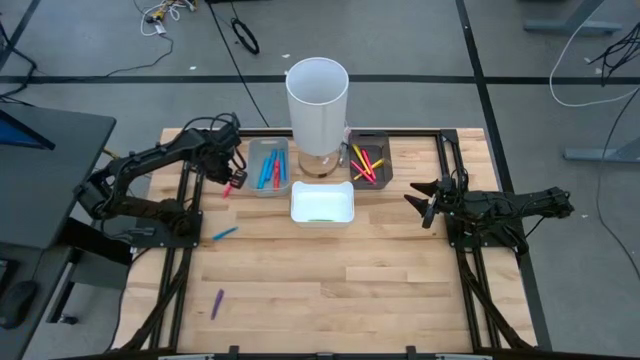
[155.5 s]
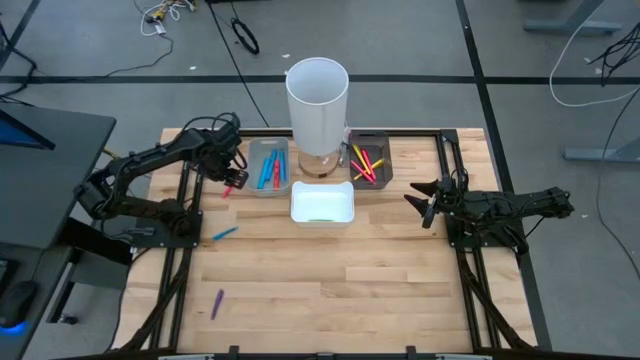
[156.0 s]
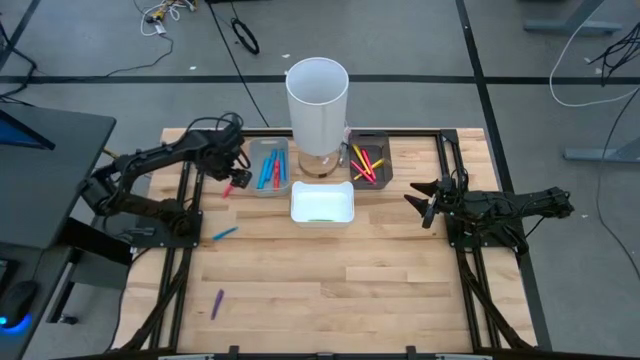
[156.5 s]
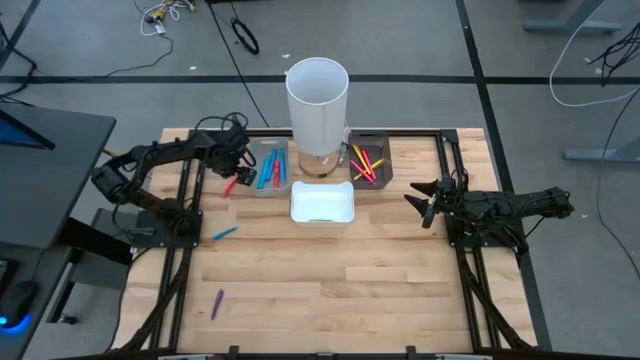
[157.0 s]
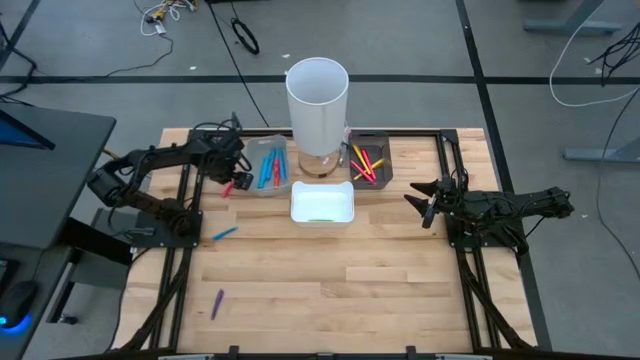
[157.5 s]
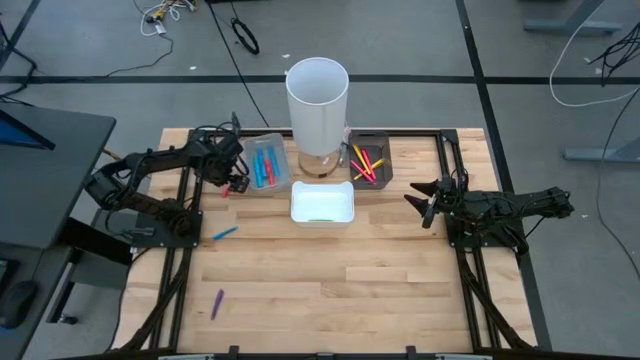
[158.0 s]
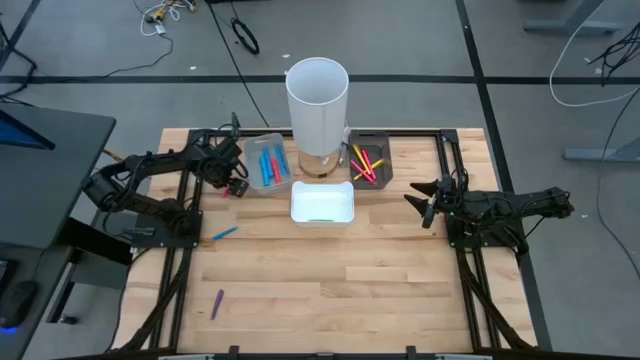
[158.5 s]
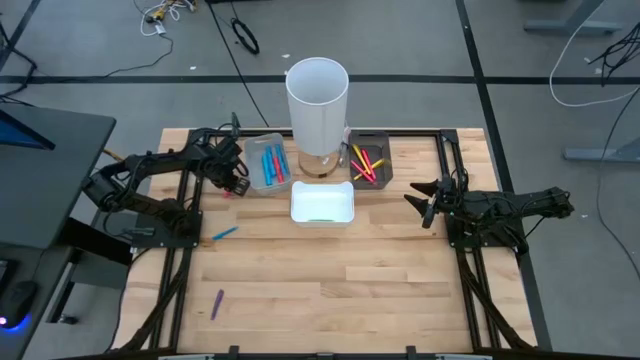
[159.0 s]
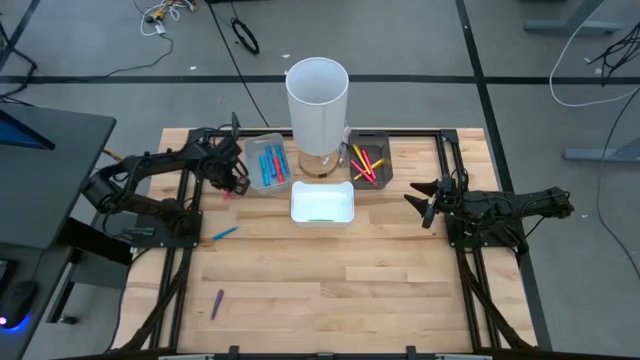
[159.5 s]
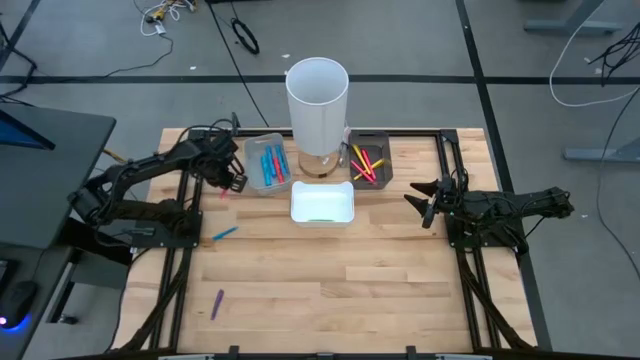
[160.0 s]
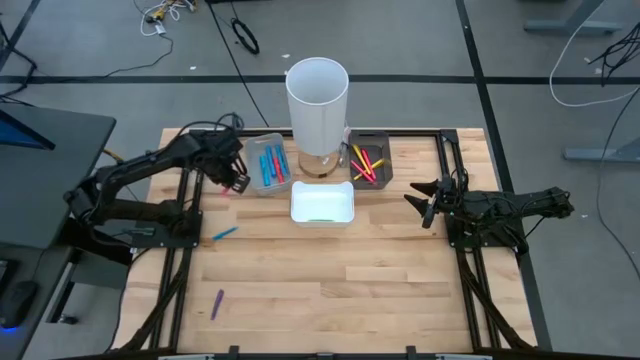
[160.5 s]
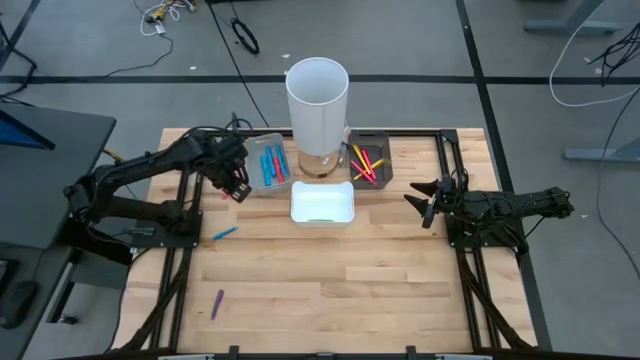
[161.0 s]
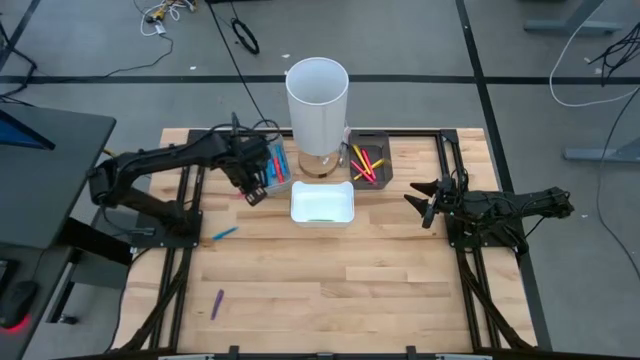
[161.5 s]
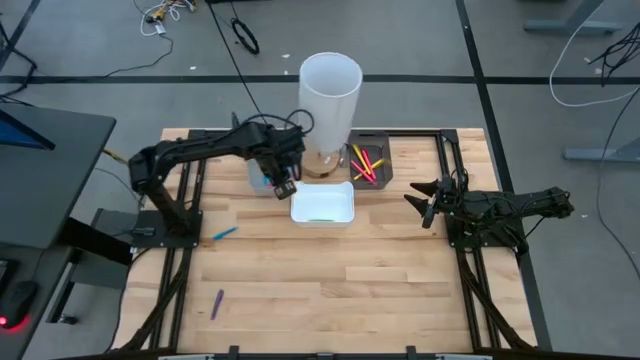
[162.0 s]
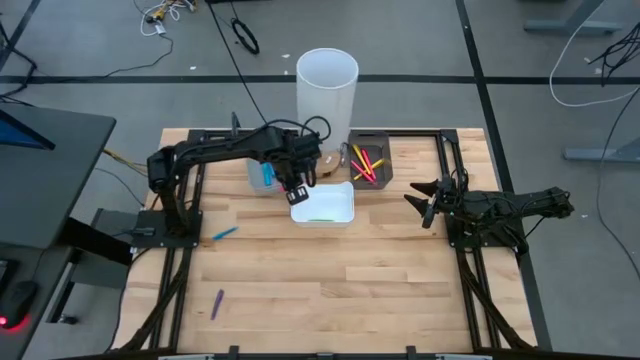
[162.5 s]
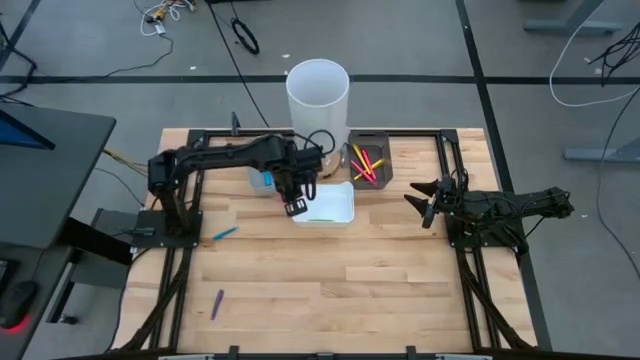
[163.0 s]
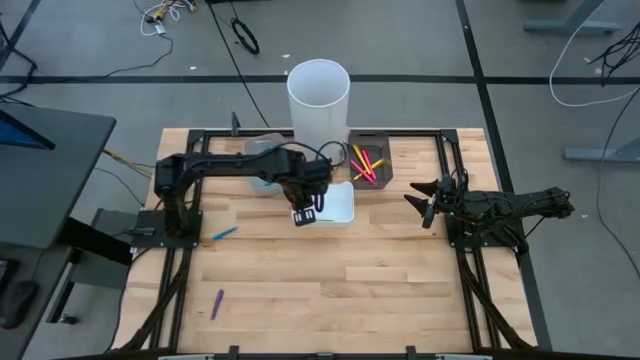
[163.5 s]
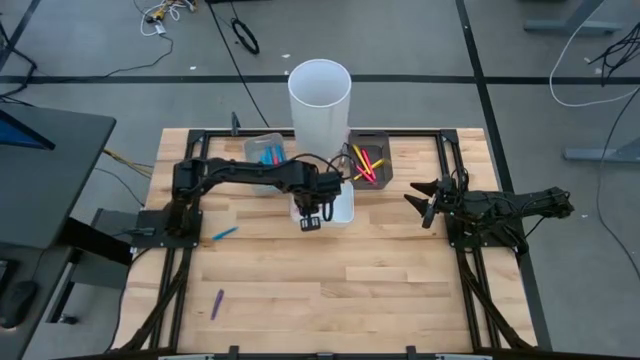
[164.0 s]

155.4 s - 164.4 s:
Task: Pick & Place Markers
Put the pink pen into the white bin

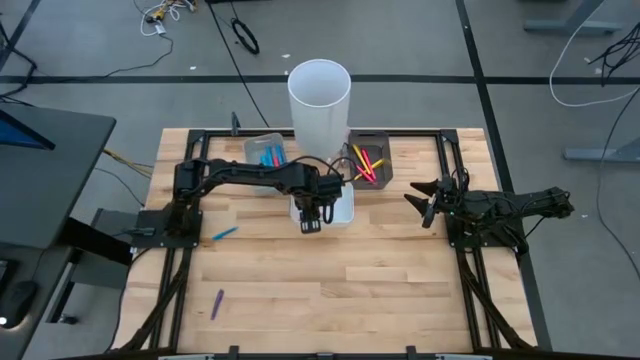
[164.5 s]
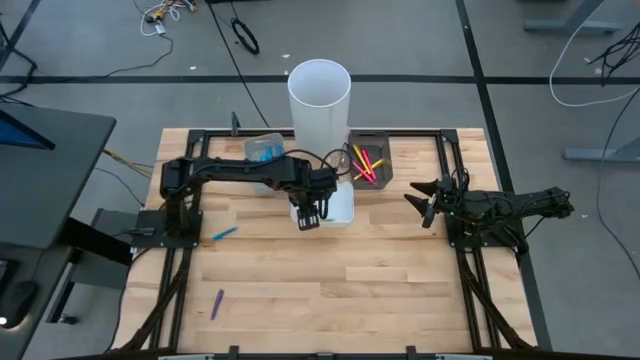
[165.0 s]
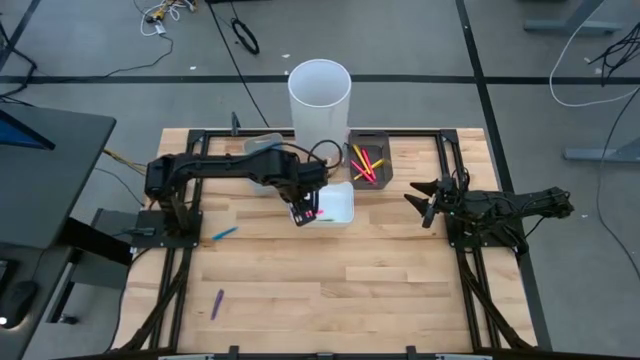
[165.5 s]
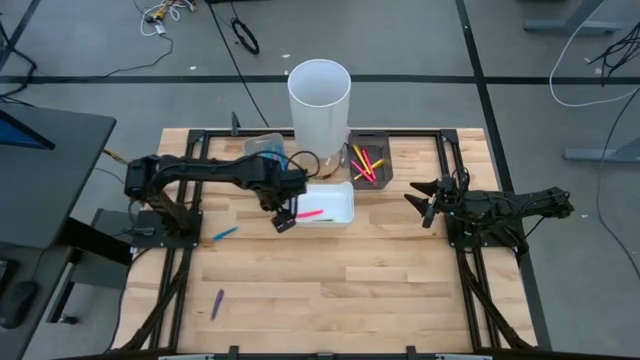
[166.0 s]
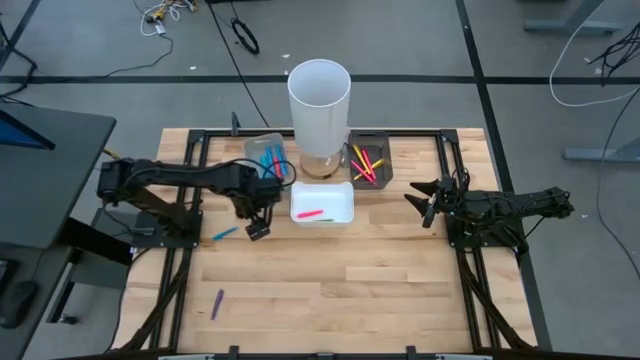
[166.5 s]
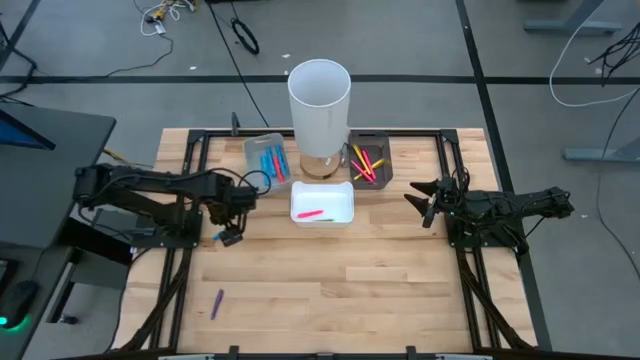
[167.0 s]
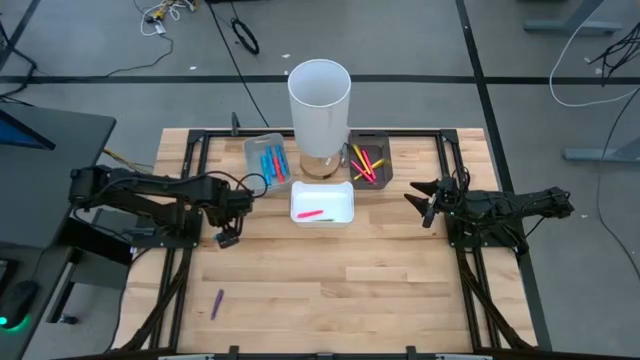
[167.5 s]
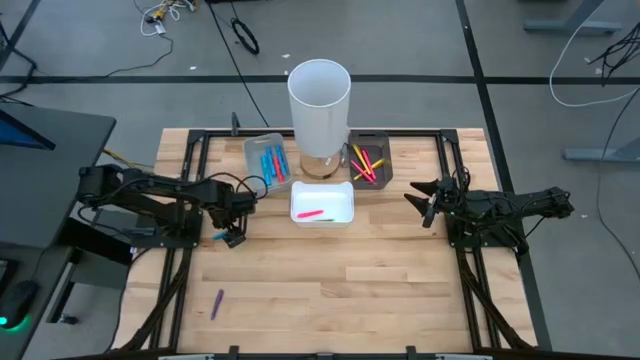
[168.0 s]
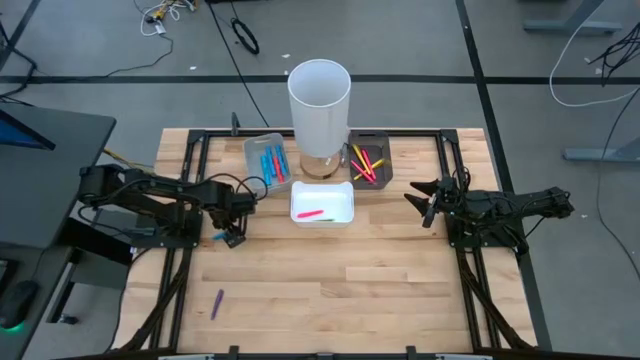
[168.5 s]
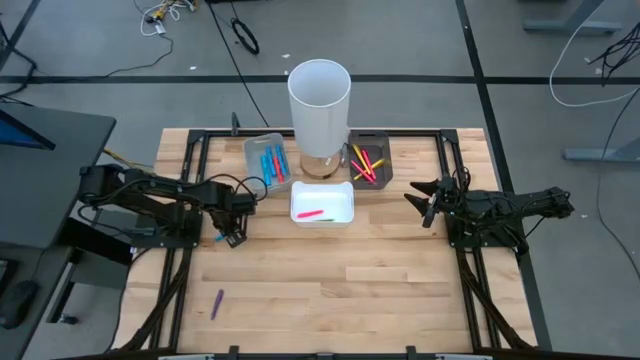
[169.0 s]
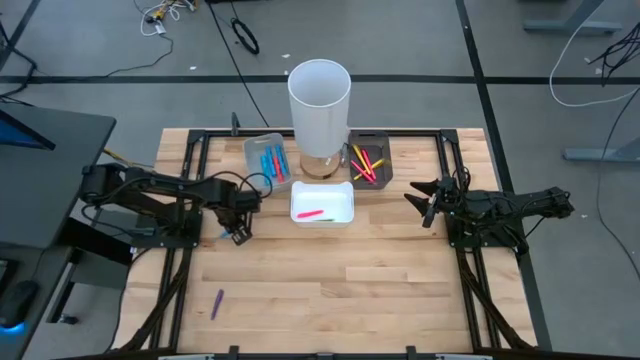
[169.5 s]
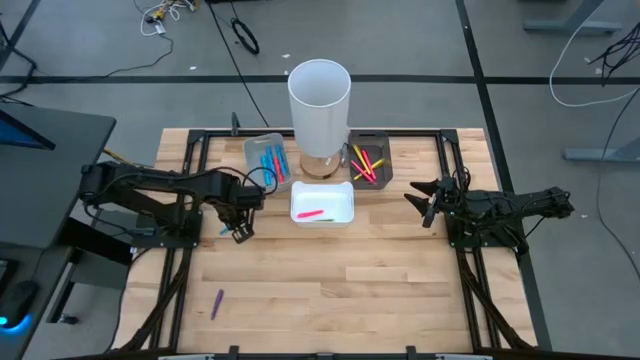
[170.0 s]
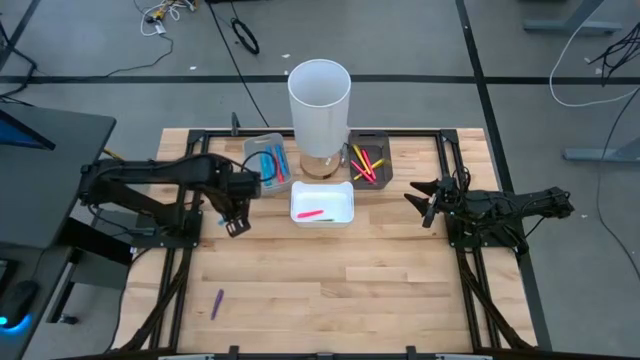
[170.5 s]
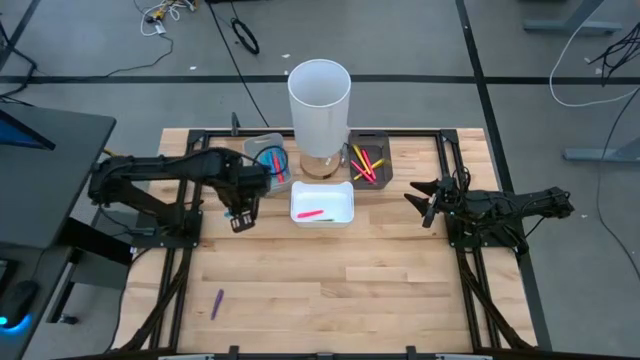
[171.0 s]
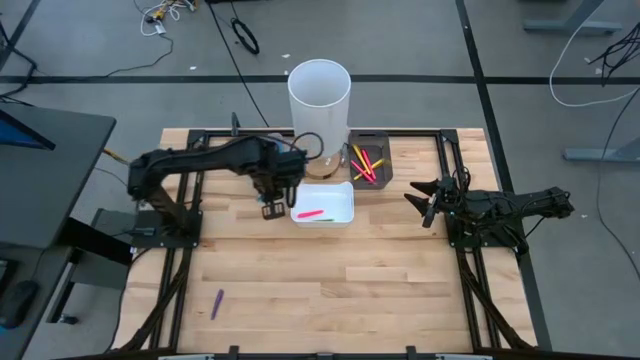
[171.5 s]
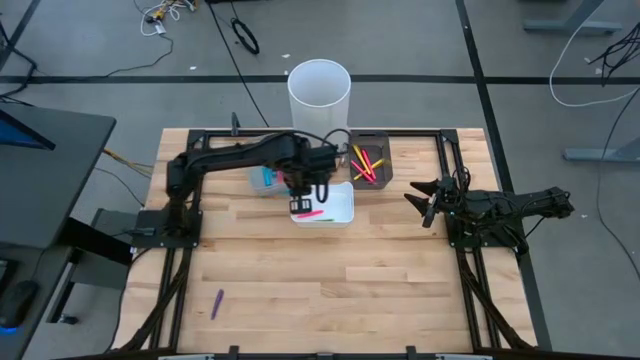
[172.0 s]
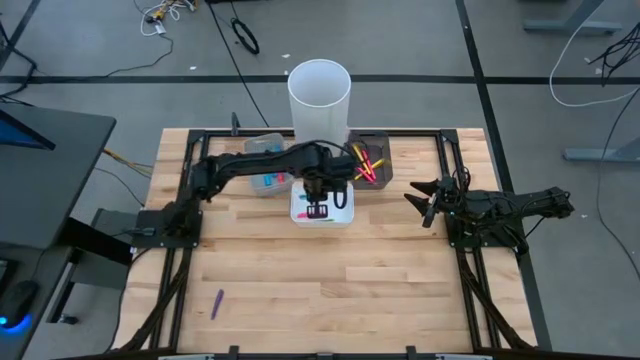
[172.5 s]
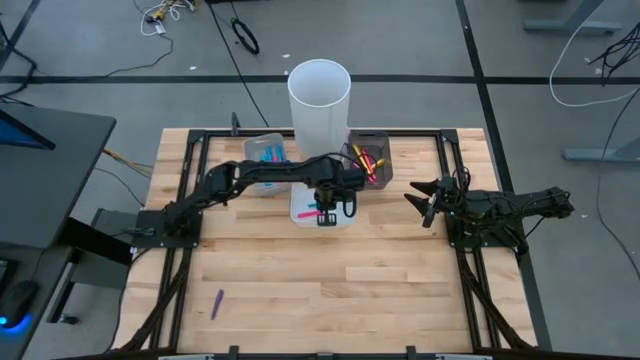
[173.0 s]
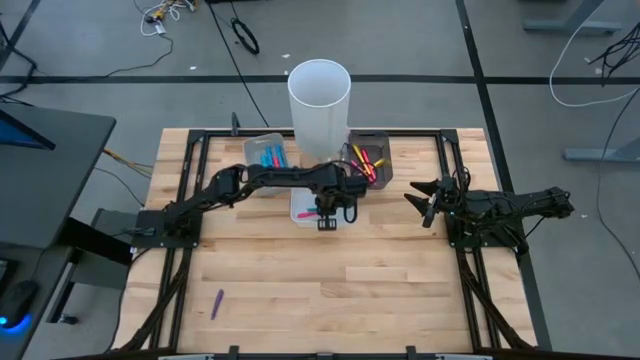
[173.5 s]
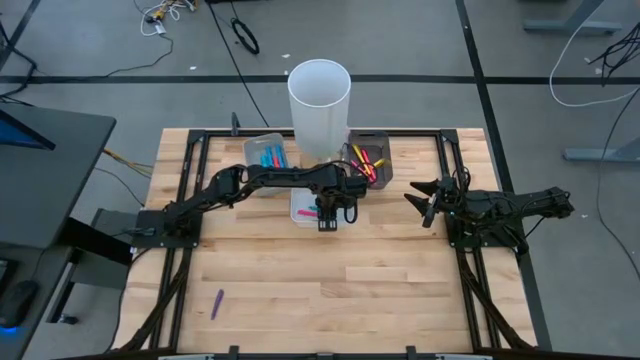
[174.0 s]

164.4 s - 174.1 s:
Put the blue pen into the white bin

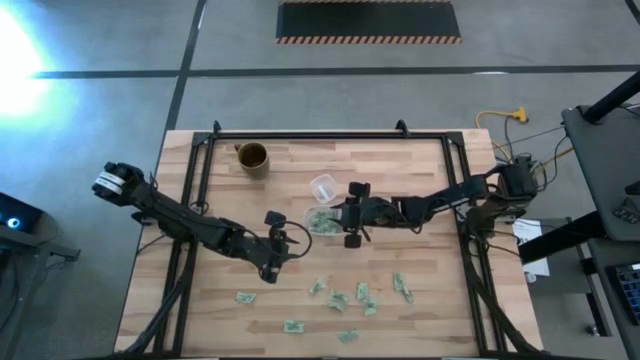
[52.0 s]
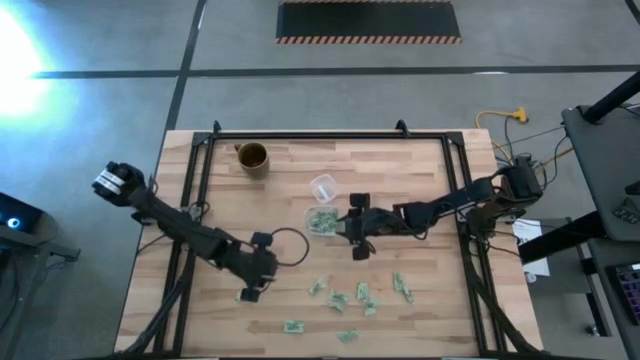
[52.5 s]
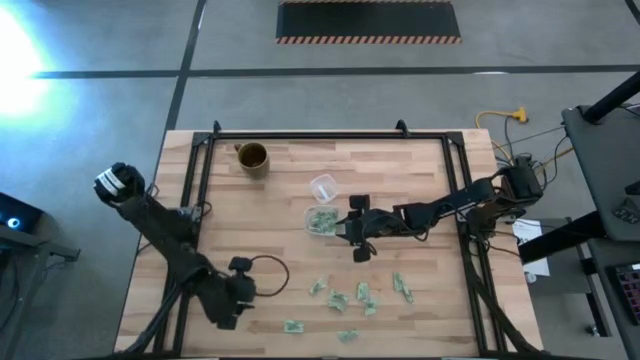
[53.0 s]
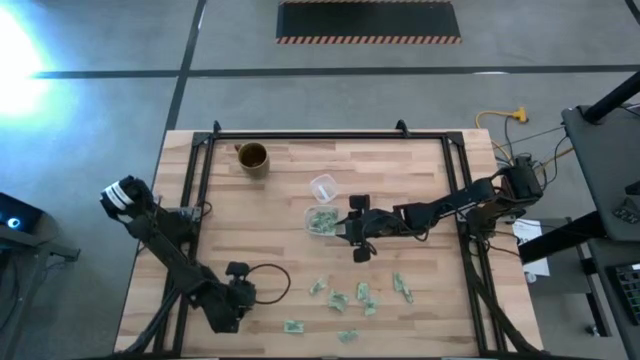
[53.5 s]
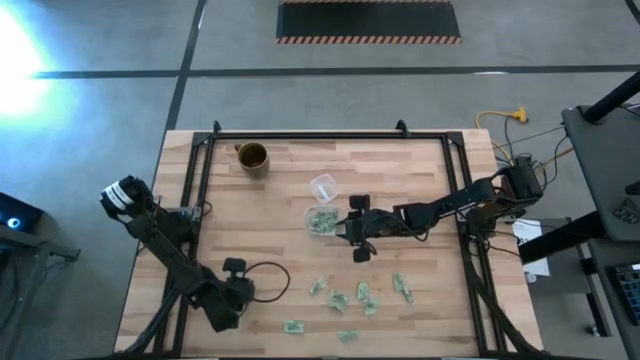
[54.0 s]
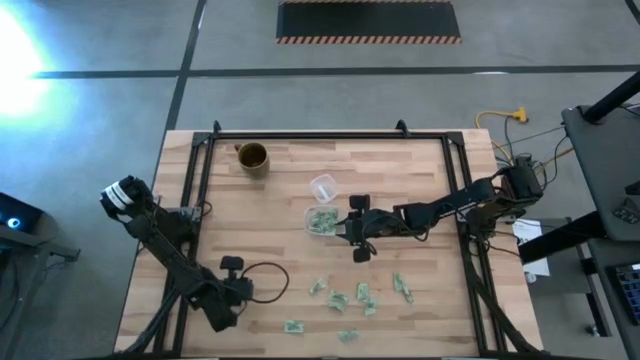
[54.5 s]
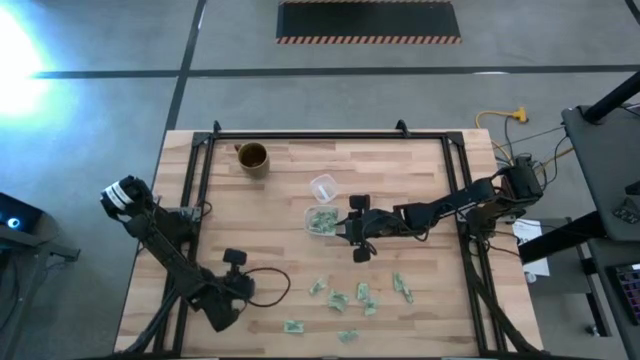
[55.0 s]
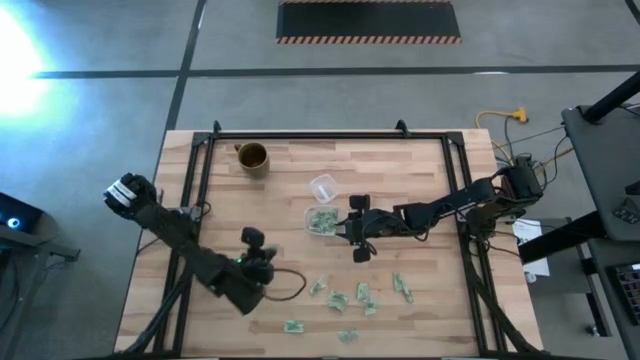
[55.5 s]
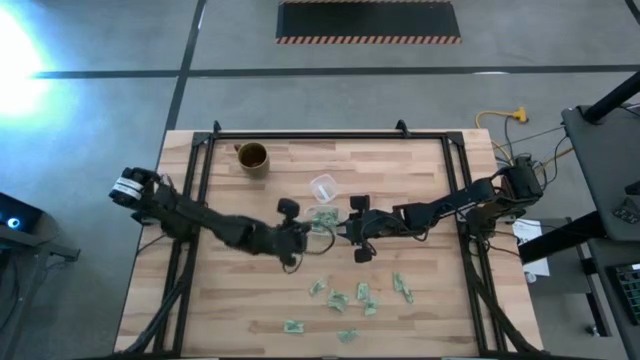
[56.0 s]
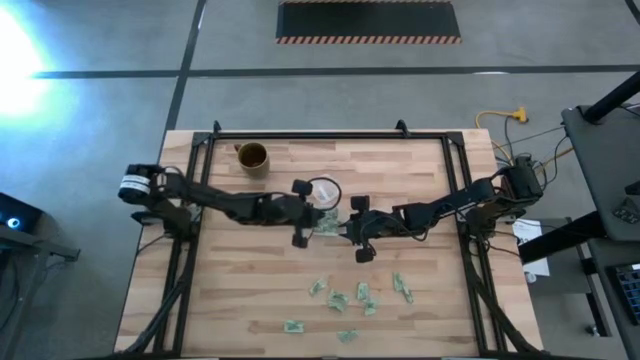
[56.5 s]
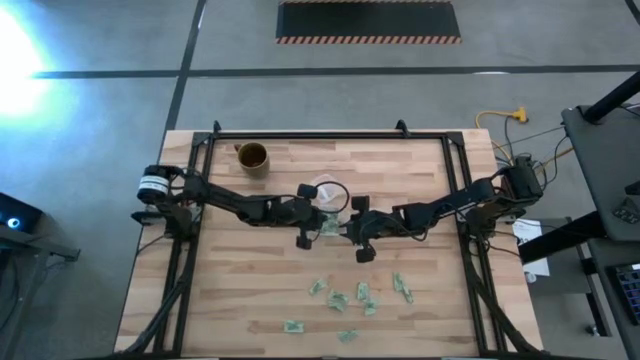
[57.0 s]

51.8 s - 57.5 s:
Task: Pick and place Stevia / Truvia into bins
Put the stevia packet into the bottom transparent container
